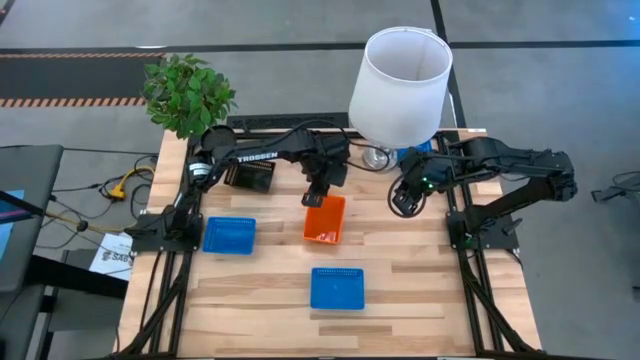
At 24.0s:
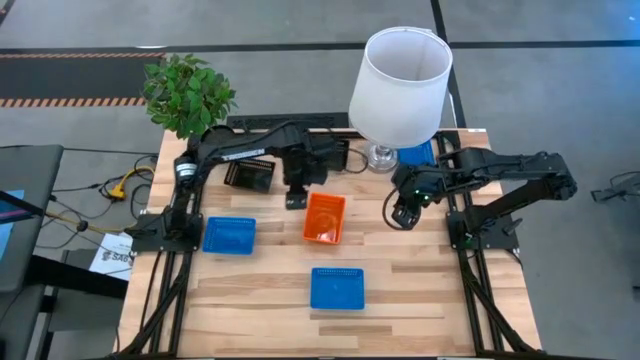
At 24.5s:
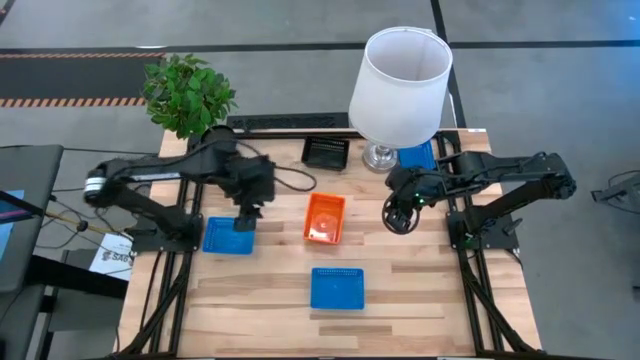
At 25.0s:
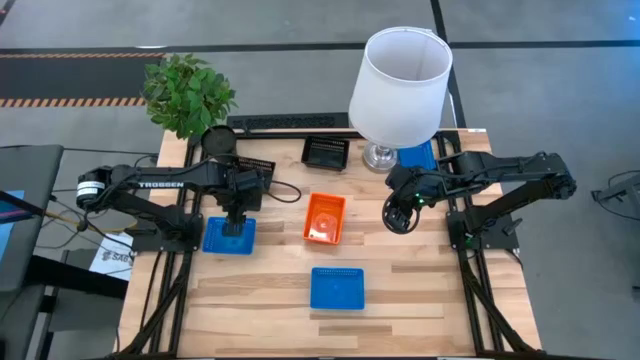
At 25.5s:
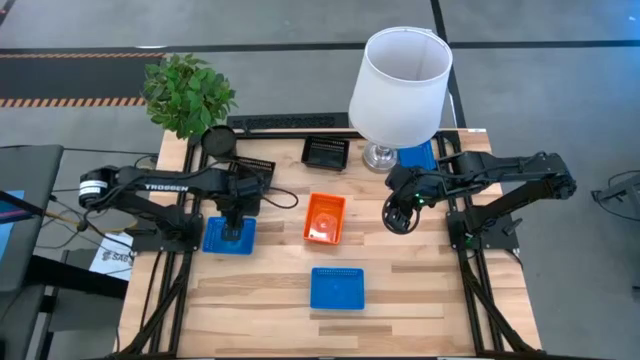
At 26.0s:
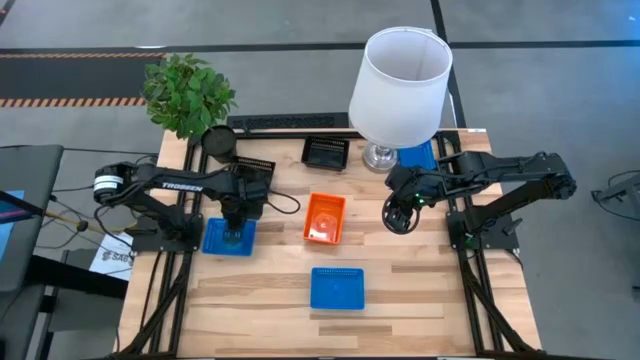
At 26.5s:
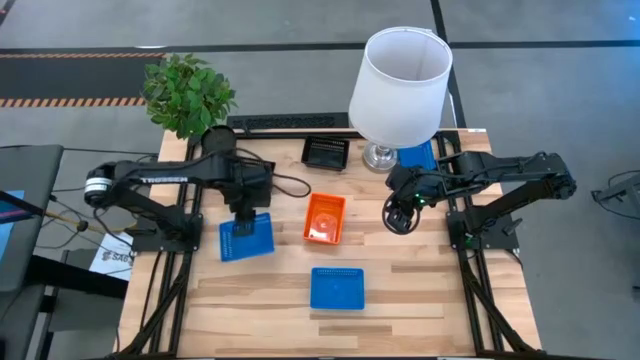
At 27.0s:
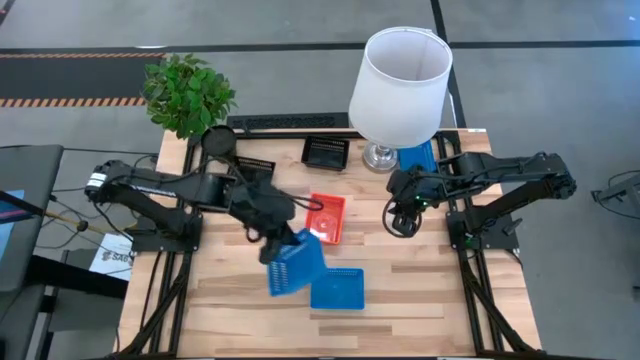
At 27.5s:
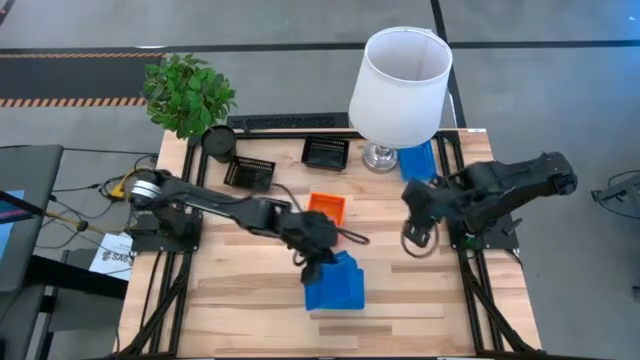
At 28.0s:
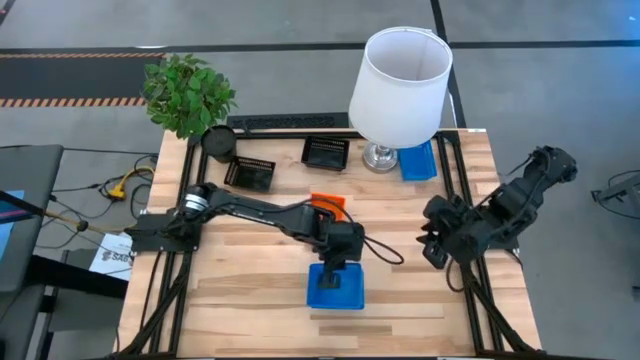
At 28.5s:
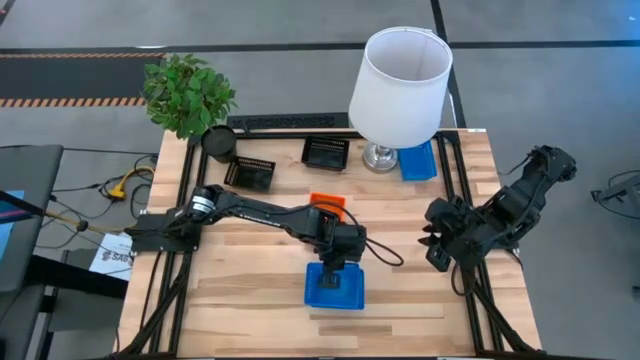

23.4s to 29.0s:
Stack the middle left blue bin on the bottom blue bin

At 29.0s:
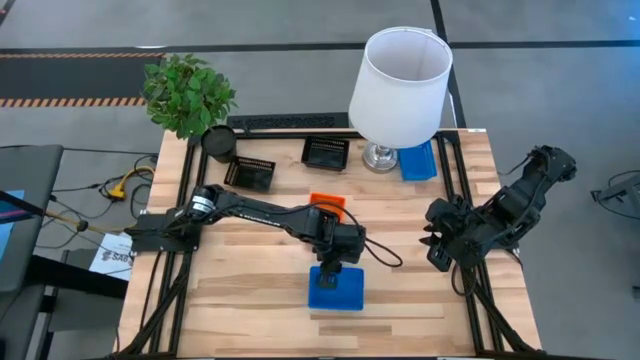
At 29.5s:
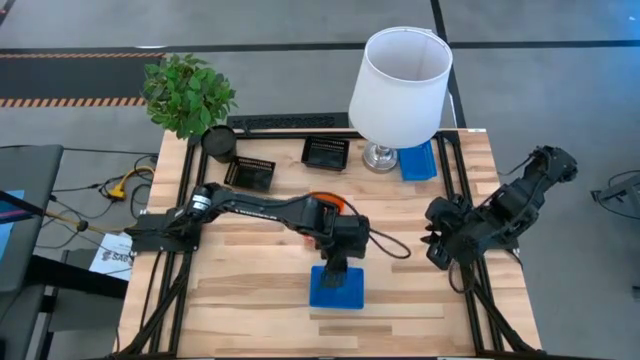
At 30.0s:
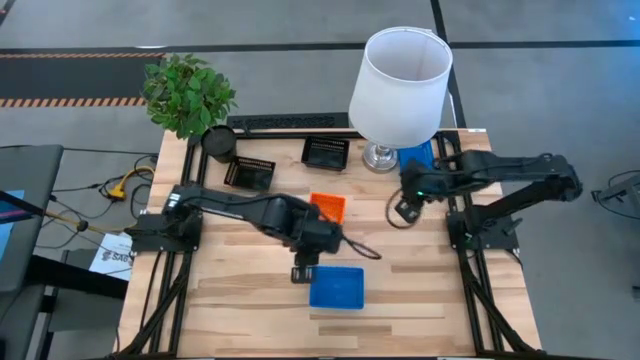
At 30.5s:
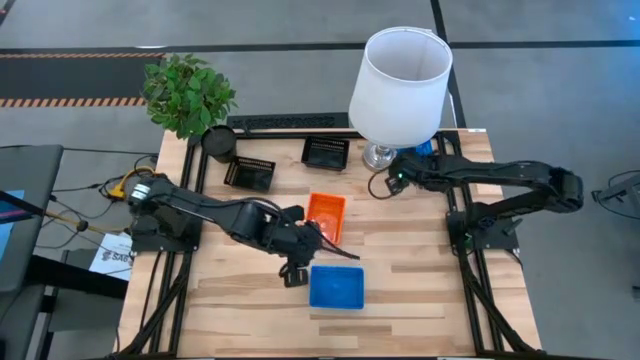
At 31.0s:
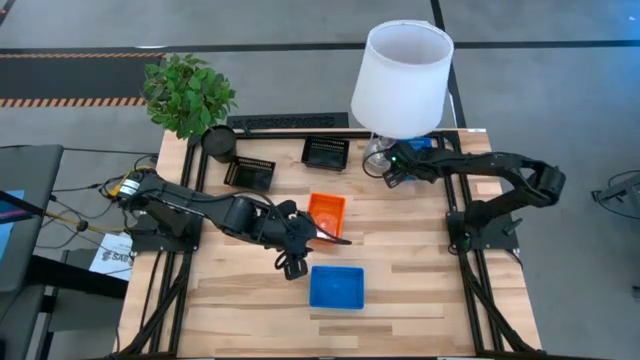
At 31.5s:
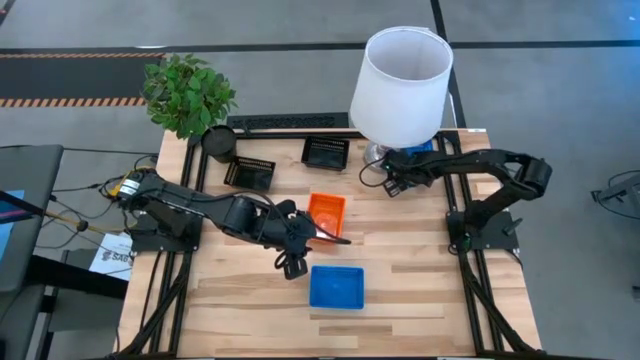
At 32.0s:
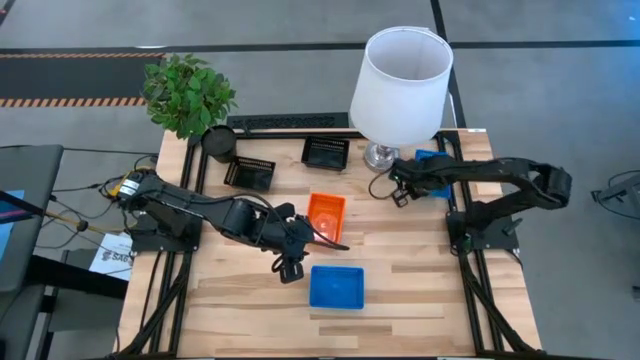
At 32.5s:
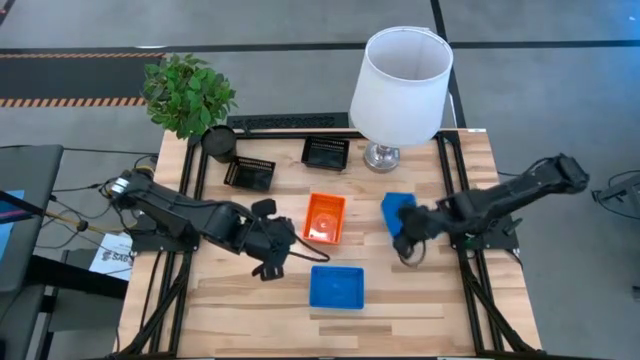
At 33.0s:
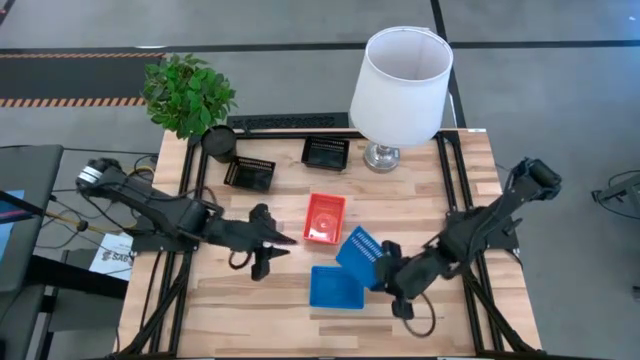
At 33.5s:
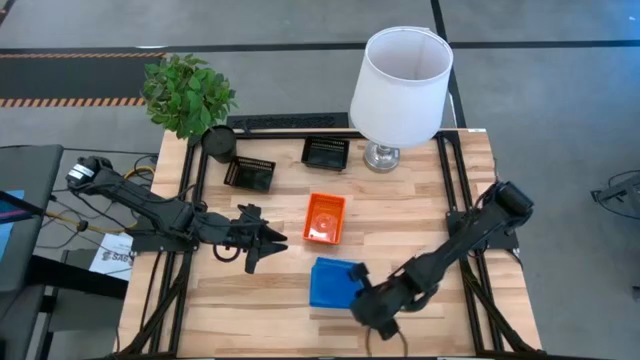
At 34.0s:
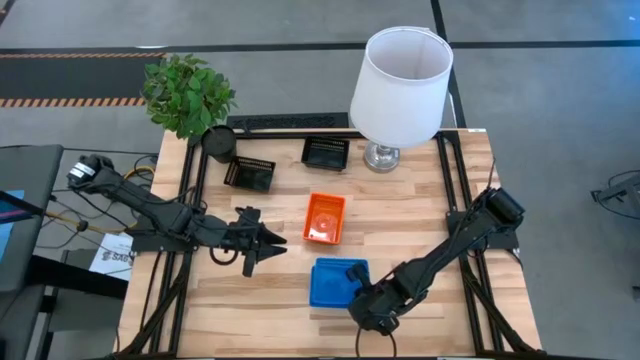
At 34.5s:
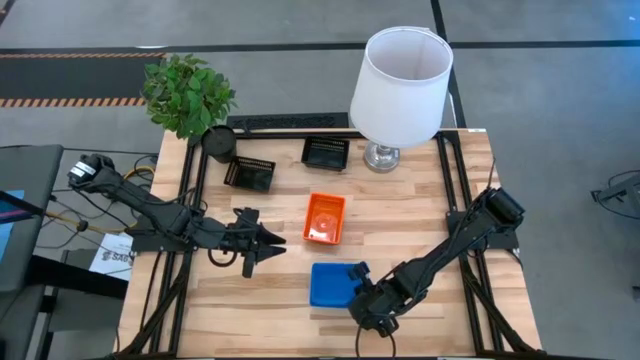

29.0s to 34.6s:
Stack the top blue bin on the bottom blue bins

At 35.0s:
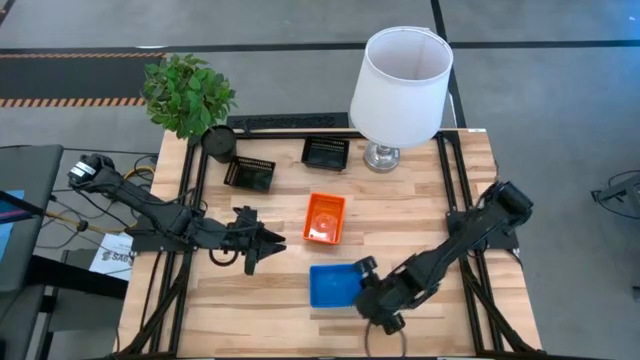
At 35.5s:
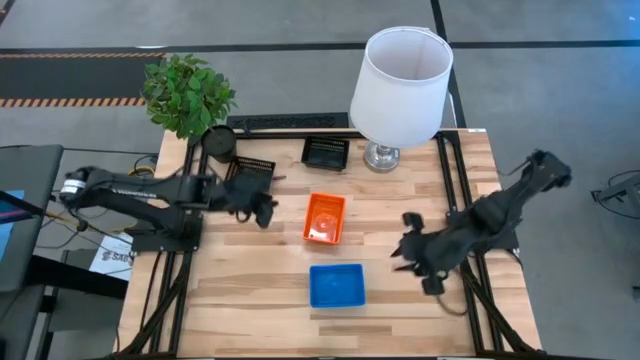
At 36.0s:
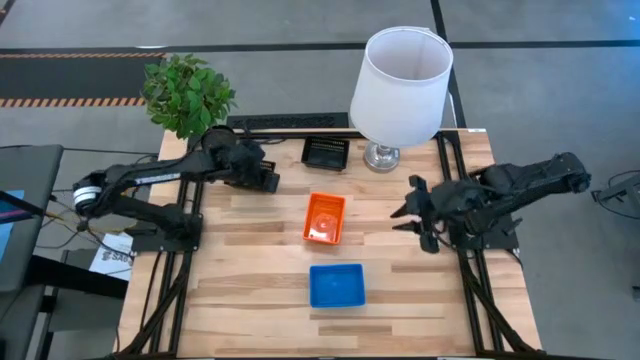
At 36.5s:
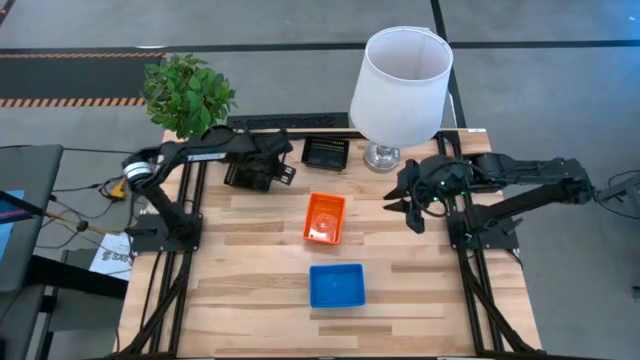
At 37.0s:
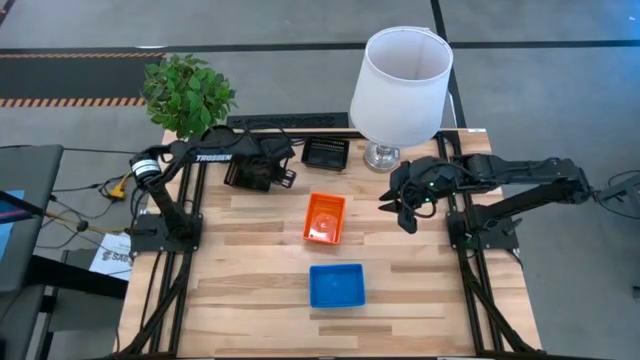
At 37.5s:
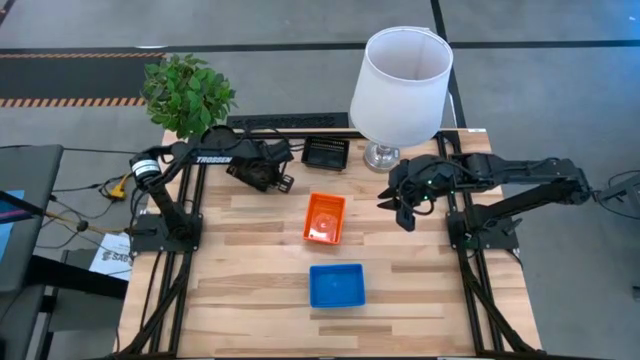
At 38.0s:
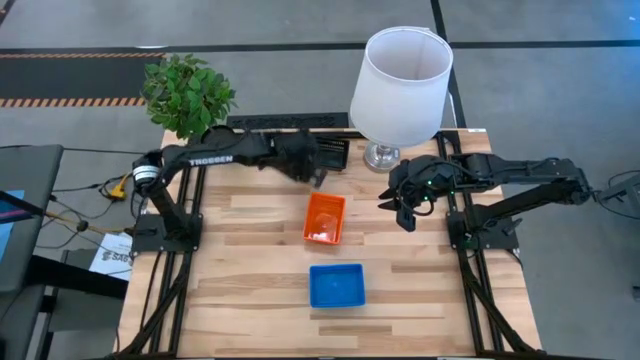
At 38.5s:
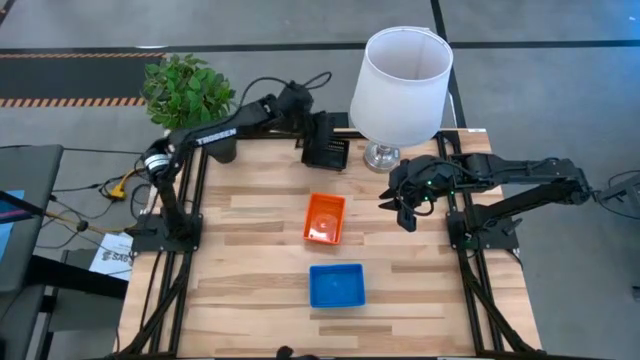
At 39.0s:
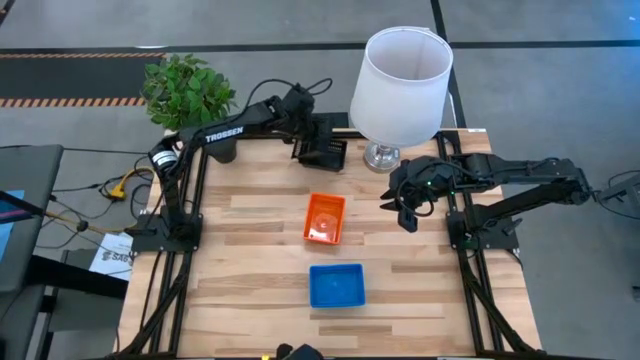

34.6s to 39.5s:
Stack the left black bin into the right black bins

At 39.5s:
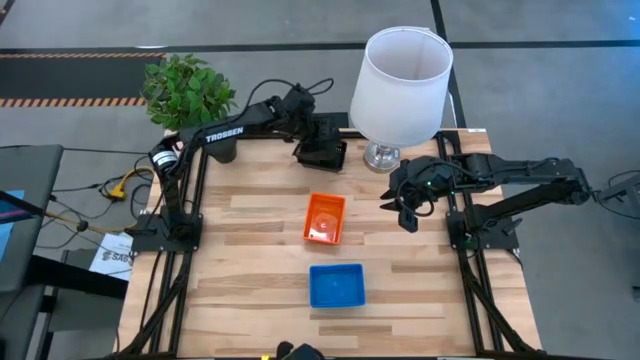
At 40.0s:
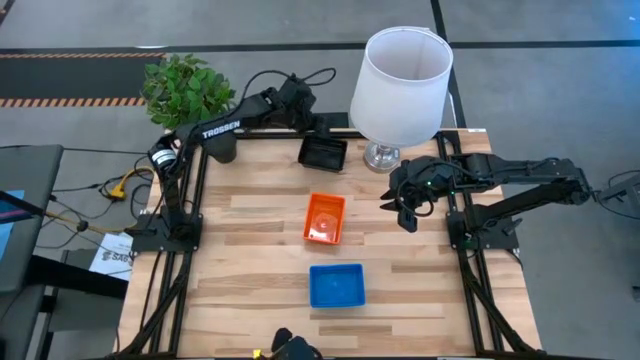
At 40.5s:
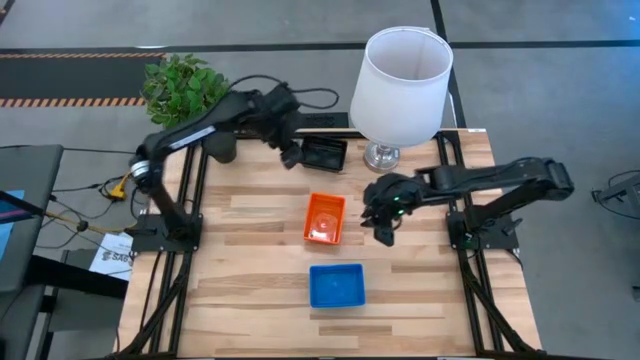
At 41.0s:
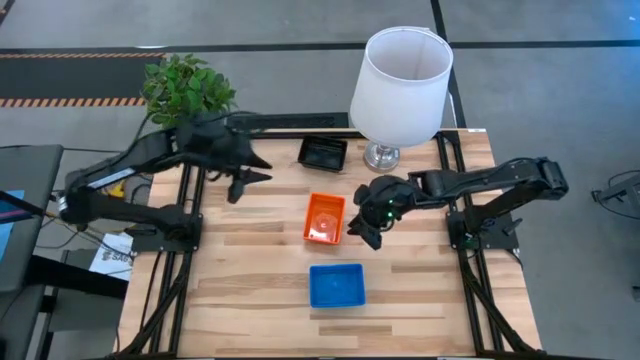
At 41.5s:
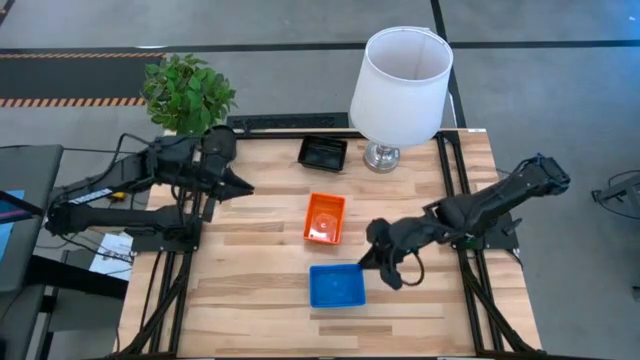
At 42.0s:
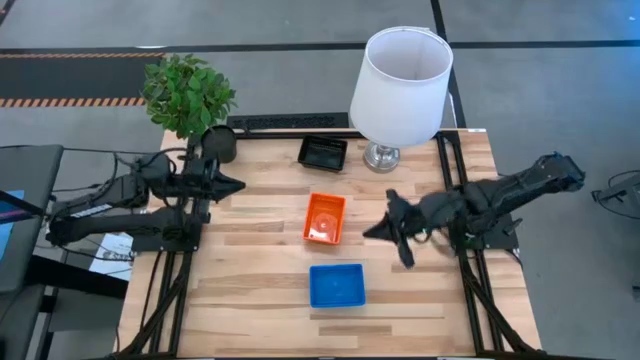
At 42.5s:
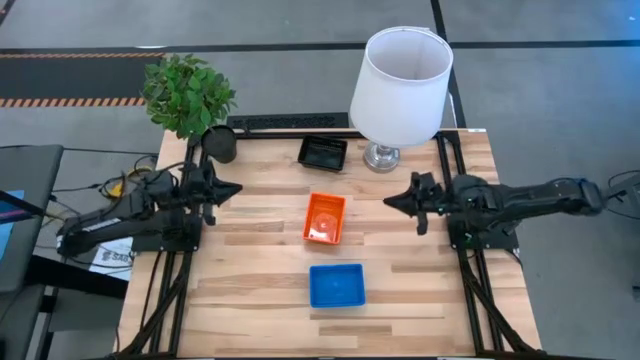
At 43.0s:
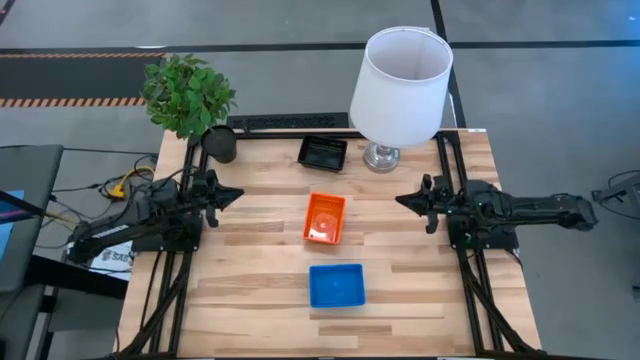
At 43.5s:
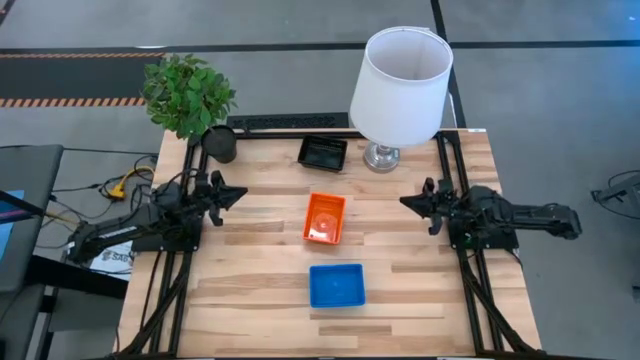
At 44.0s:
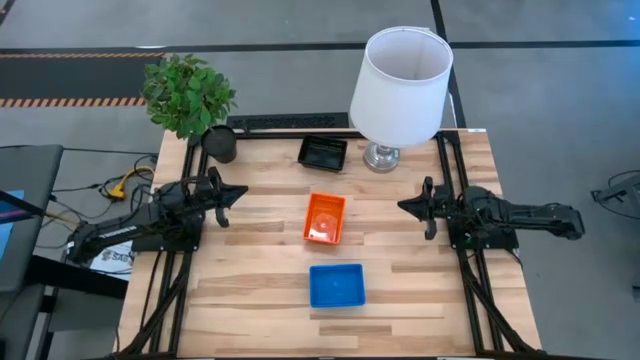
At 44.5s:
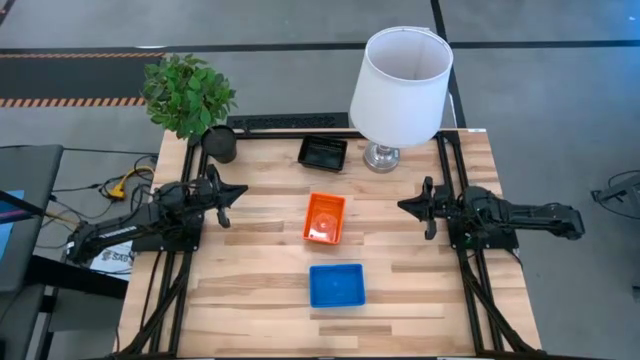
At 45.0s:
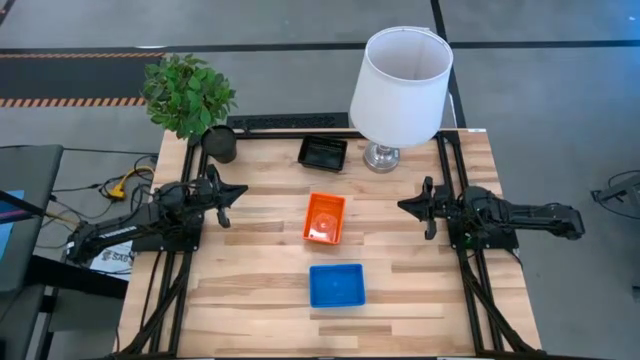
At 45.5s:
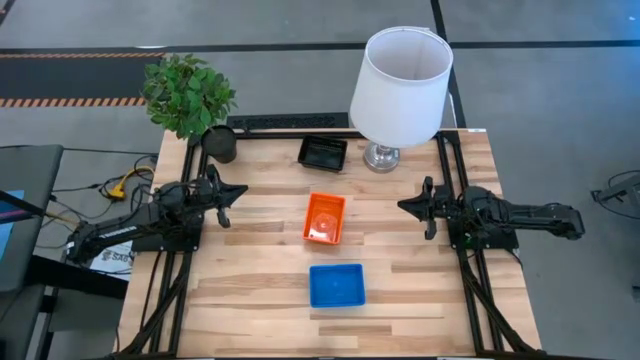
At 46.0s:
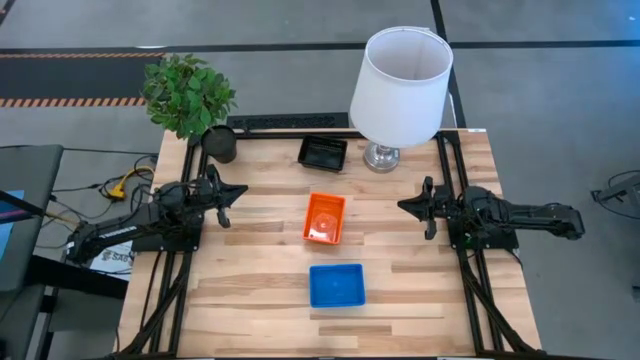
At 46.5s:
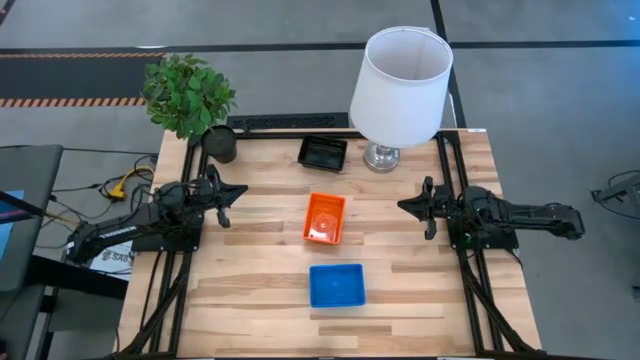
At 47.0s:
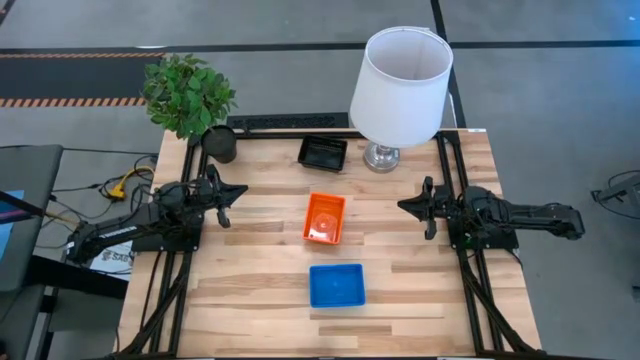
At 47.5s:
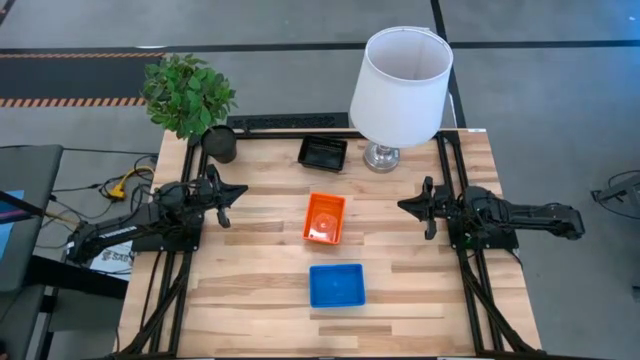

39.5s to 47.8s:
Return to Home Position
